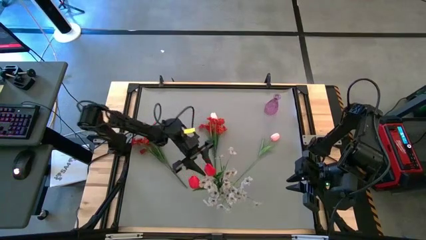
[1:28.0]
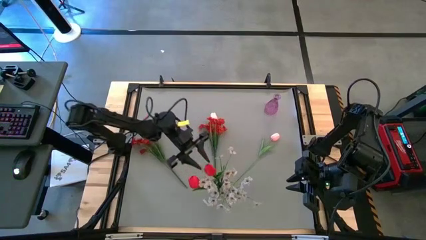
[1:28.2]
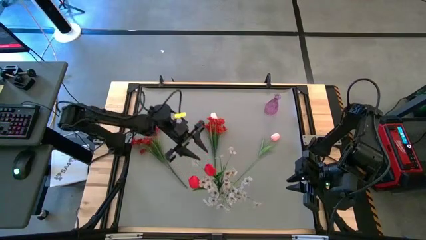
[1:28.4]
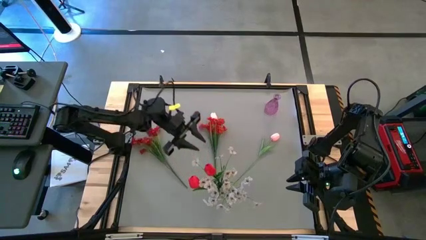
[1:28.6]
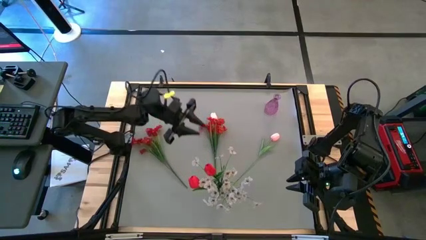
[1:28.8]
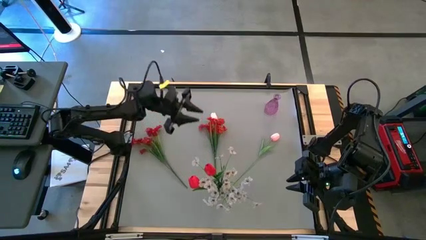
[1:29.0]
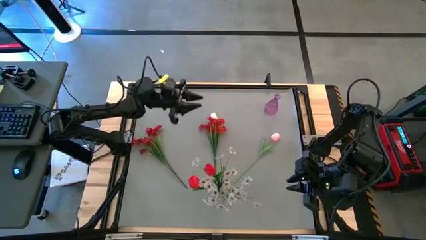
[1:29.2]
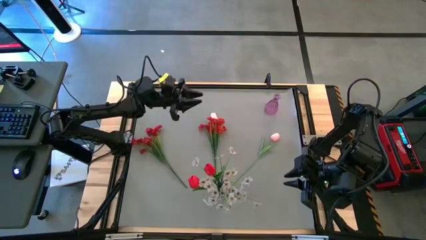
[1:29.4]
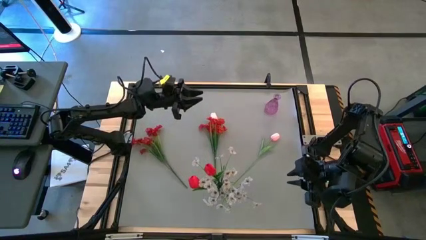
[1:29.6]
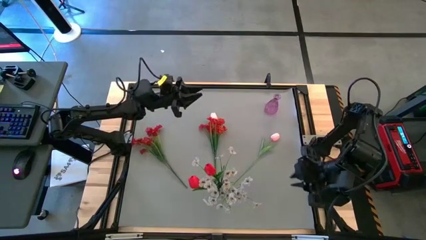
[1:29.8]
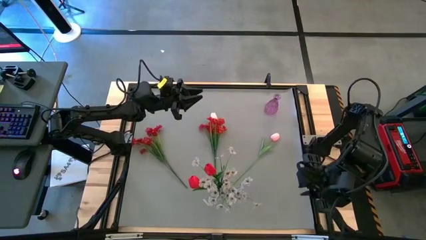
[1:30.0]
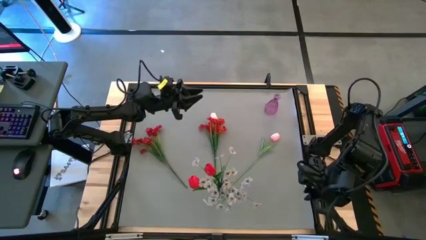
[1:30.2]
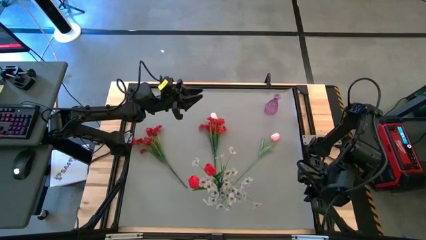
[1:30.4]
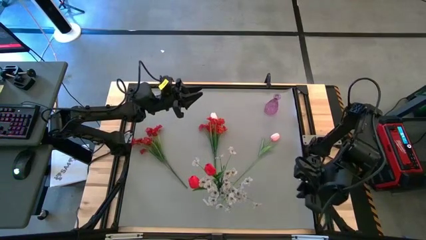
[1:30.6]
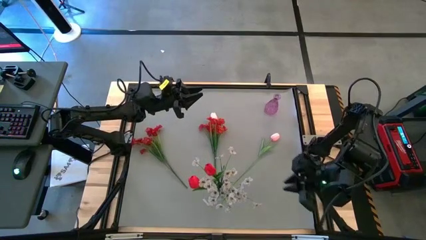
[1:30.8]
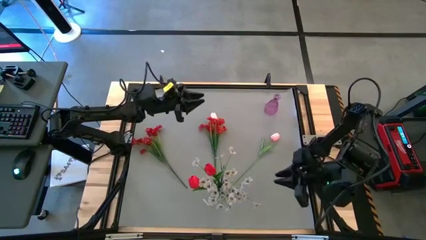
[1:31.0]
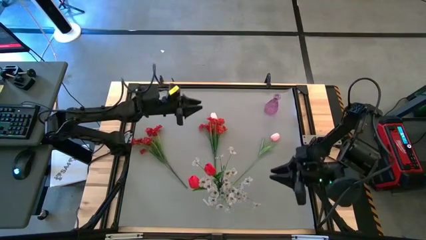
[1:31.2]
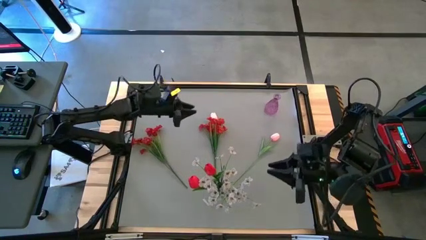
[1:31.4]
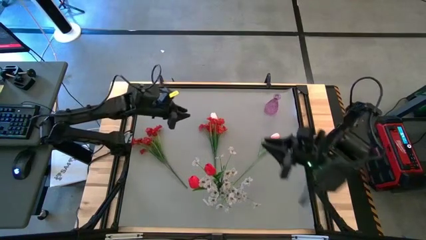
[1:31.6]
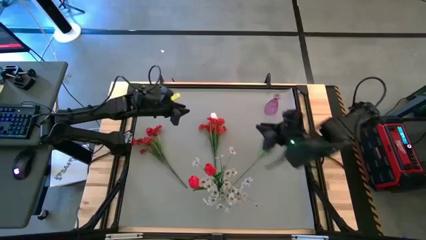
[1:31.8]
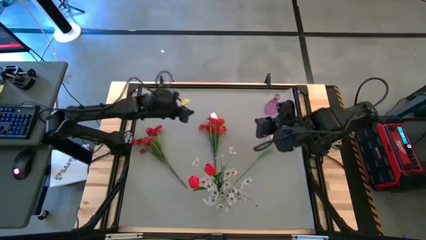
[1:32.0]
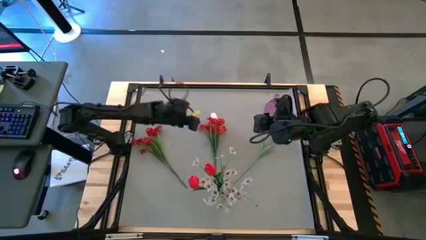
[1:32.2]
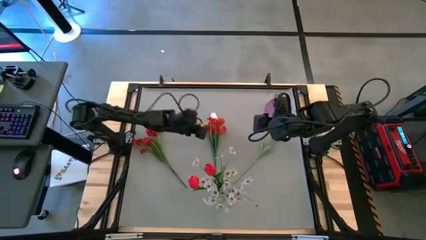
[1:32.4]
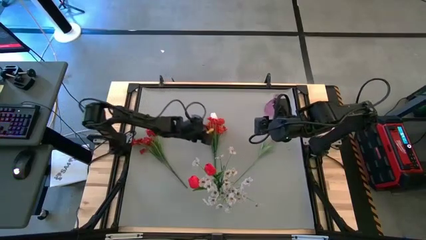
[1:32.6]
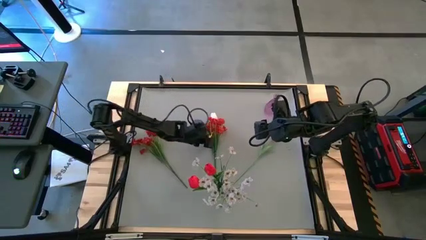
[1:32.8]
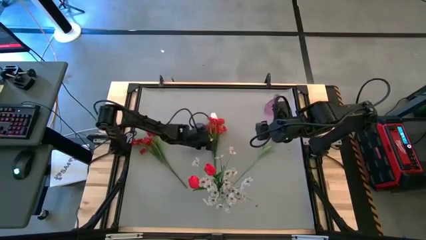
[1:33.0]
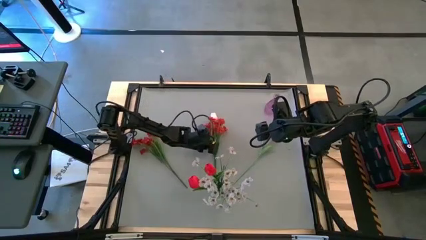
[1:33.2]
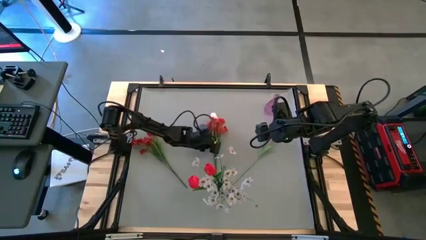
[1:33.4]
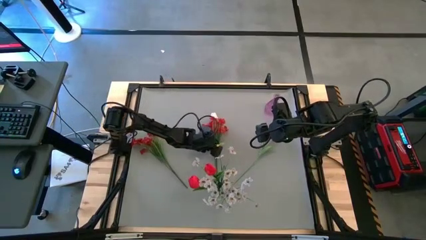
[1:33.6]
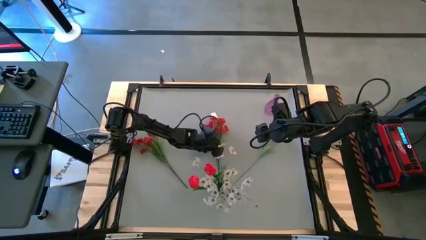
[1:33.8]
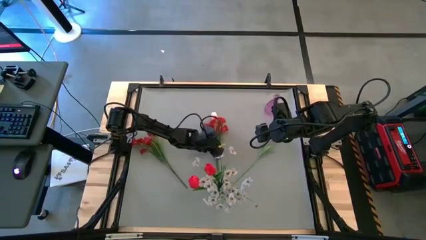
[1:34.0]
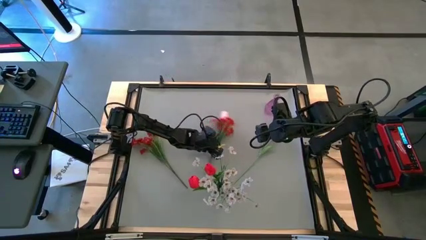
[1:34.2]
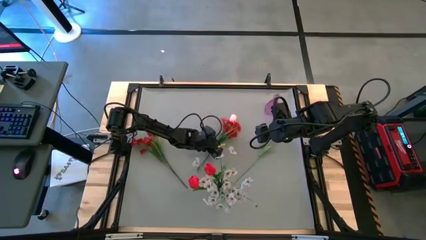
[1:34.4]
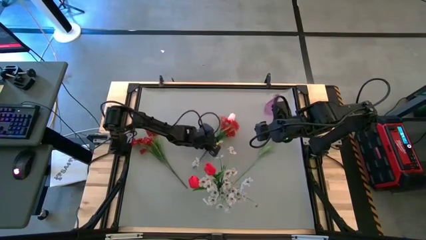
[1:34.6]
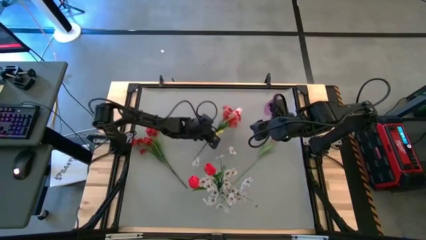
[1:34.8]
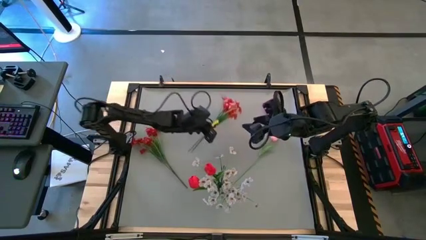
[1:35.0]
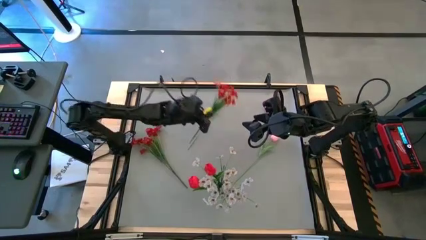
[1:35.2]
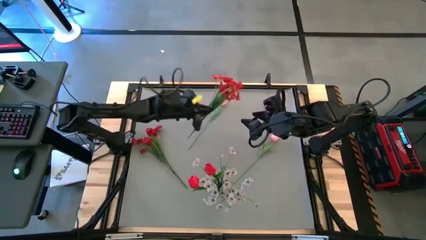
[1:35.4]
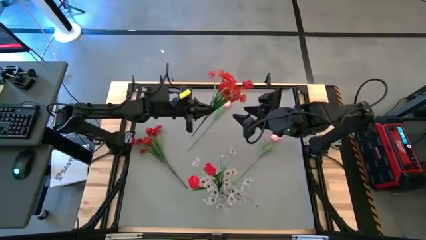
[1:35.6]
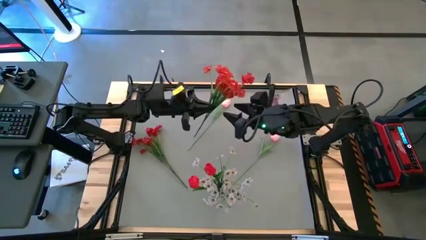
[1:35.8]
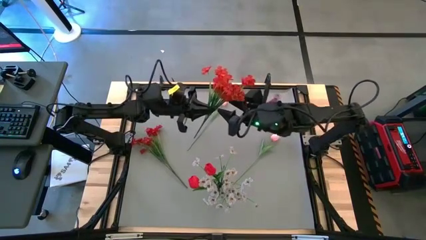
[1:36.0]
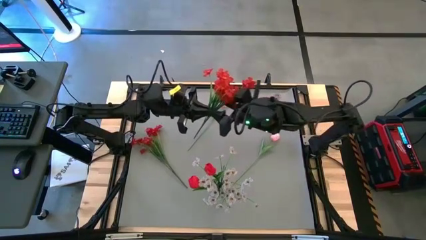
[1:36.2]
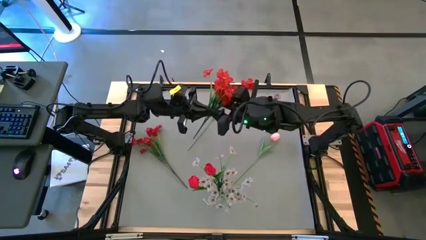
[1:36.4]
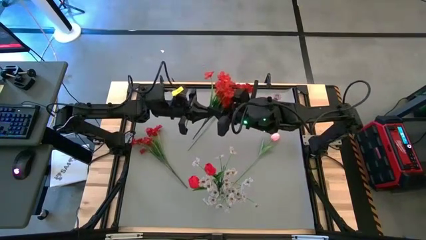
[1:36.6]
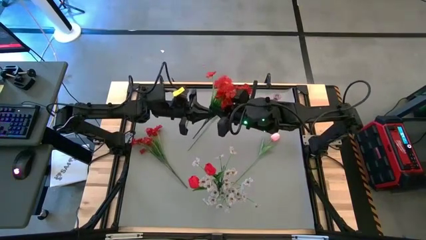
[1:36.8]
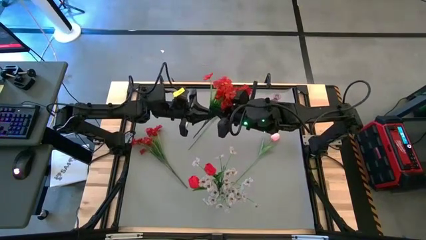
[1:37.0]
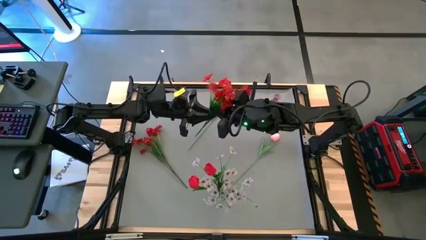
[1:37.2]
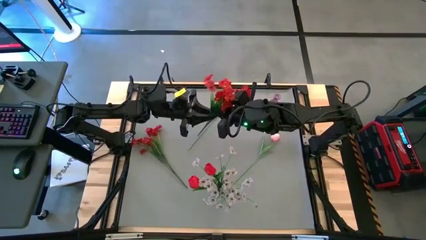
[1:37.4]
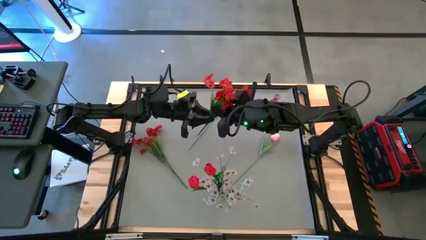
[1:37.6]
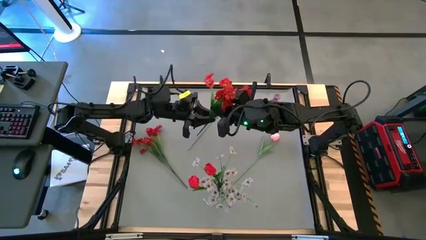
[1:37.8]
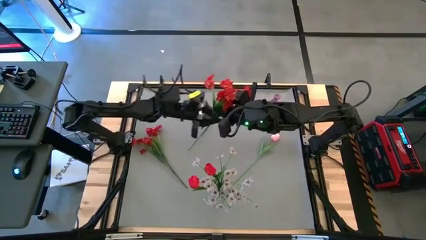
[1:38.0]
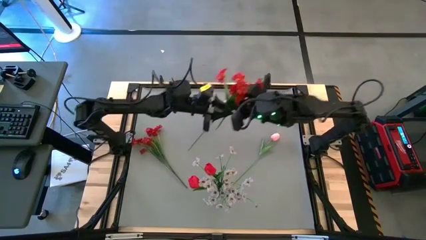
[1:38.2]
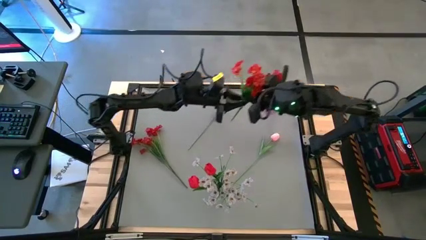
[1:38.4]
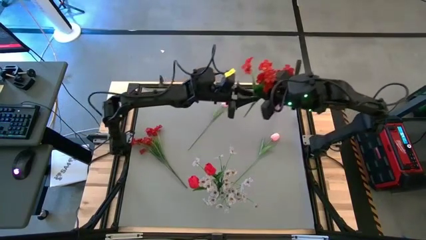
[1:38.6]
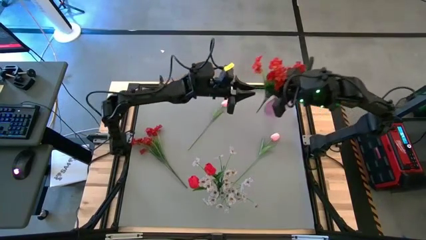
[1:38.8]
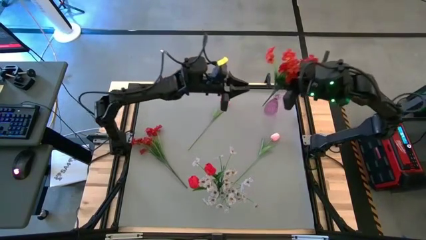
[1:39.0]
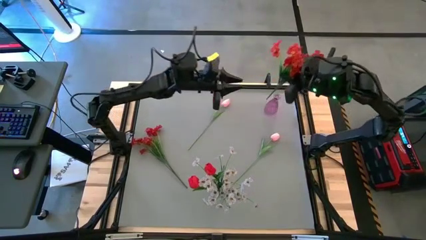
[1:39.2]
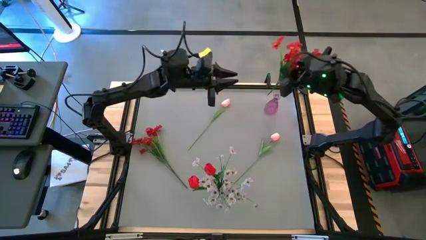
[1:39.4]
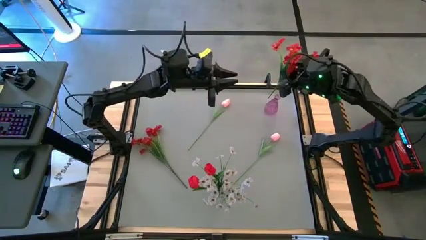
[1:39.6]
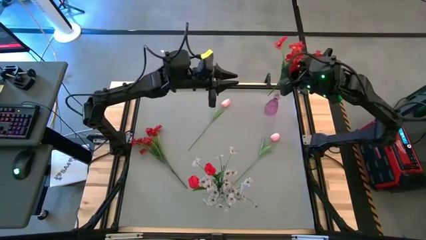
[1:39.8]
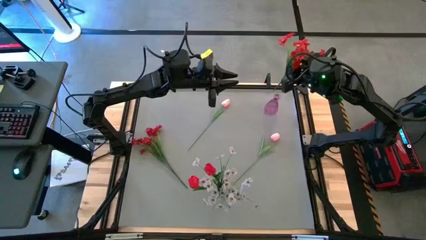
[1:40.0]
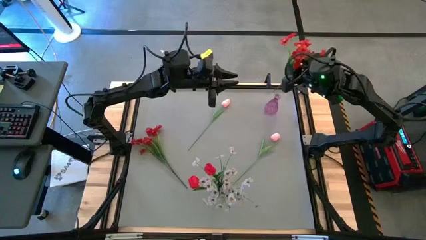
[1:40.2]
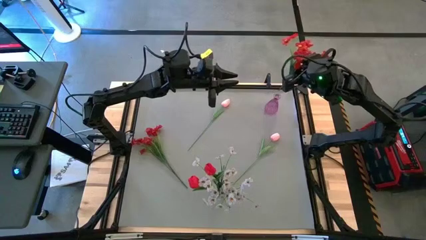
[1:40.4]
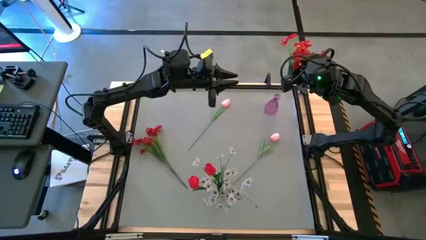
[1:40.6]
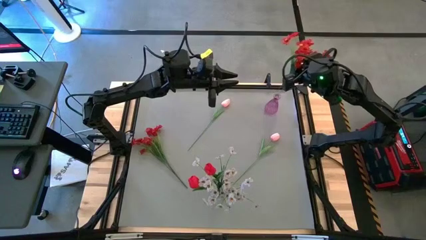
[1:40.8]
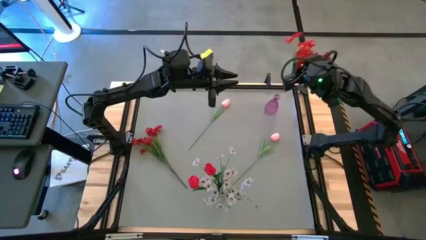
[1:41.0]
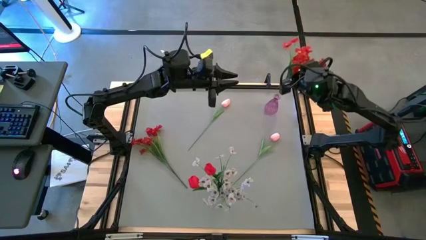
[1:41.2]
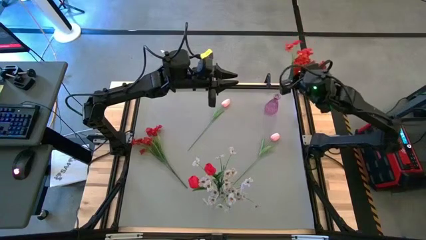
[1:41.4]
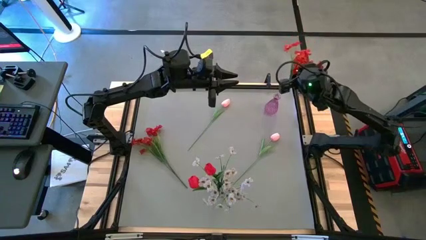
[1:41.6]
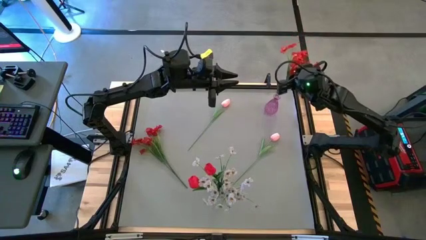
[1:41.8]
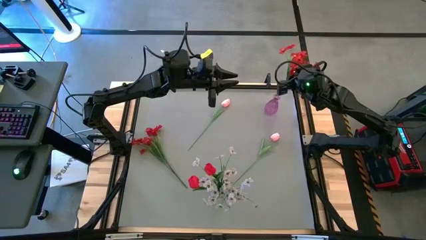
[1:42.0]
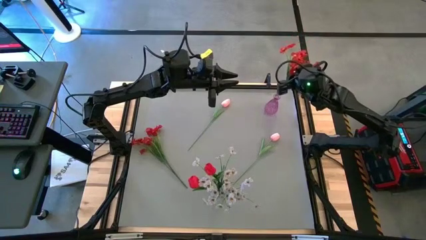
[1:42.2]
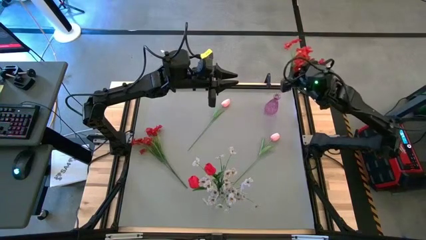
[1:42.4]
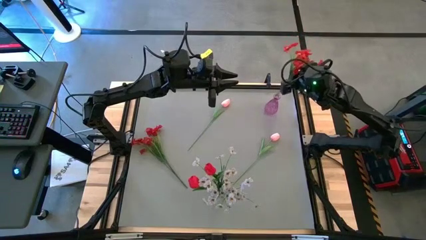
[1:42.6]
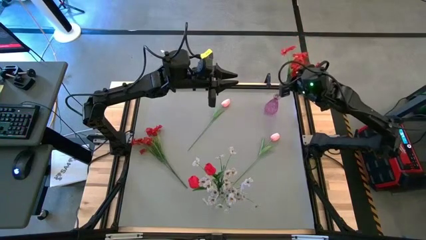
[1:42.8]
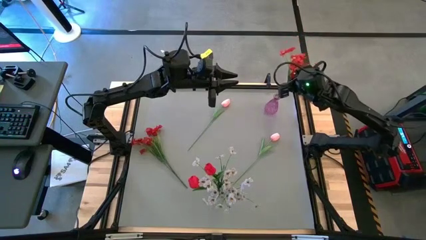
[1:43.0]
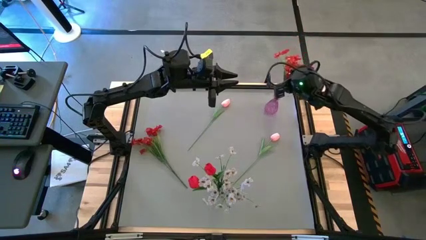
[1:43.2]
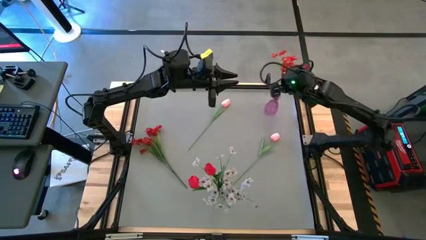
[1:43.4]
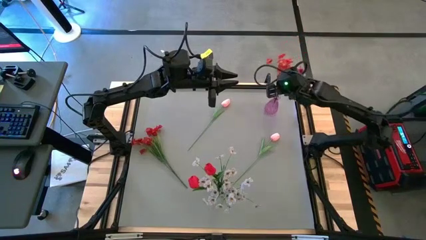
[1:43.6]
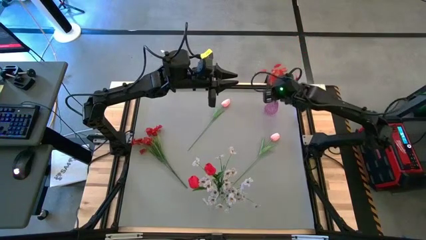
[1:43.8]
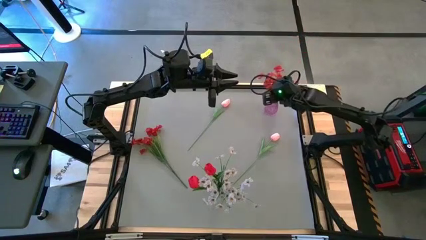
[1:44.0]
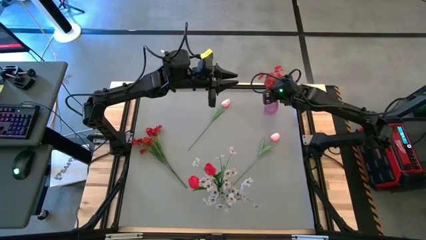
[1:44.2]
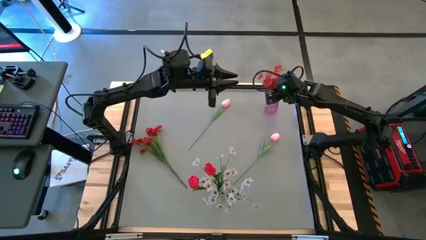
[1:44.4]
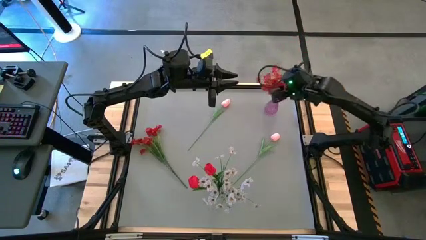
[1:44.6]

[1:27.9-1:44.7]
Task: Sort flowers into vase by color
Put the right red flowers into the violet vase
